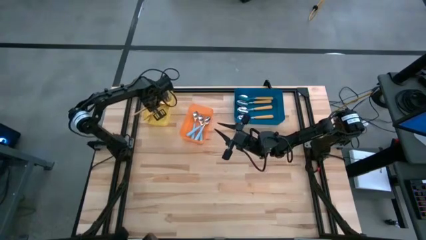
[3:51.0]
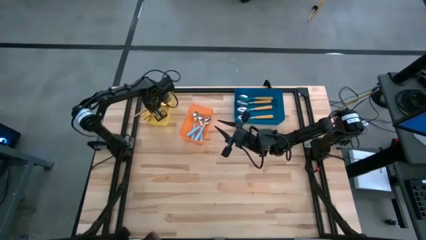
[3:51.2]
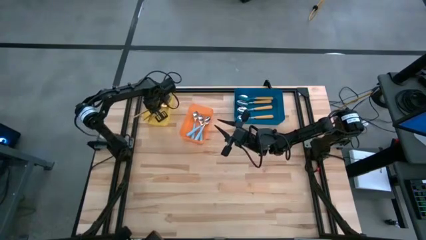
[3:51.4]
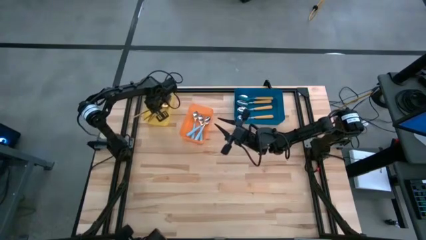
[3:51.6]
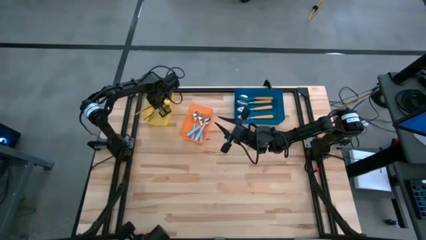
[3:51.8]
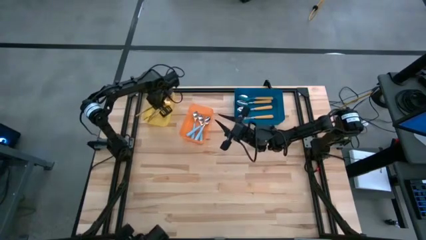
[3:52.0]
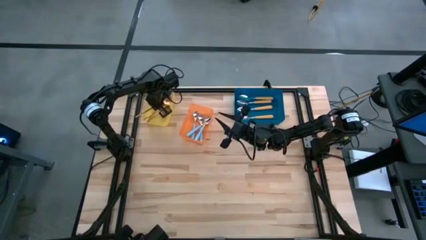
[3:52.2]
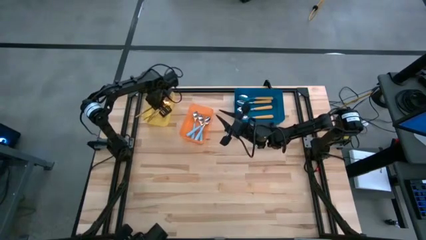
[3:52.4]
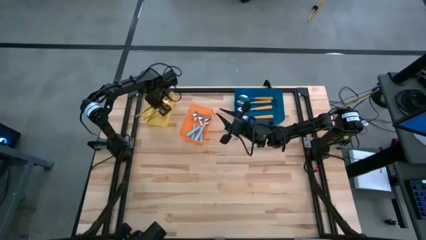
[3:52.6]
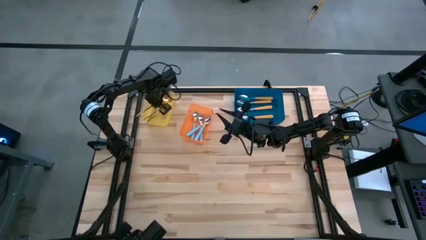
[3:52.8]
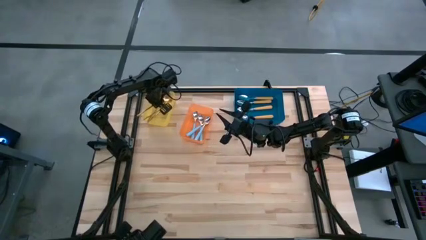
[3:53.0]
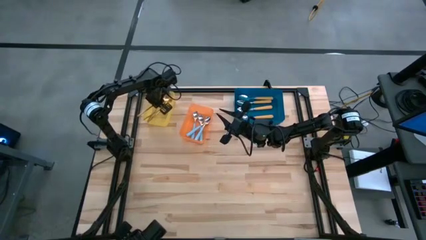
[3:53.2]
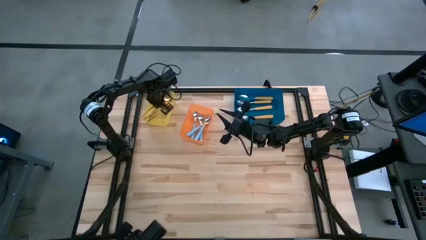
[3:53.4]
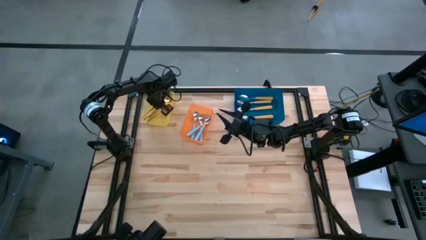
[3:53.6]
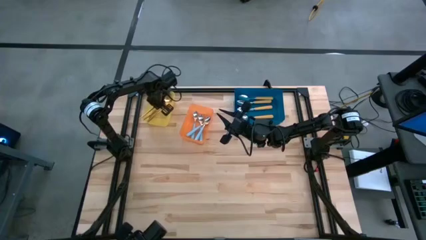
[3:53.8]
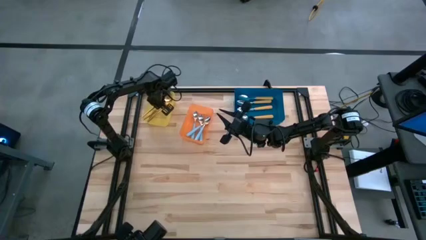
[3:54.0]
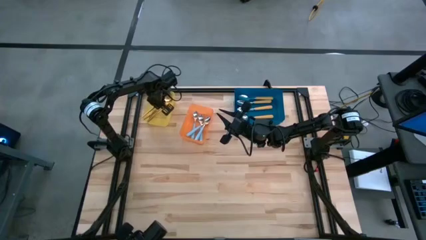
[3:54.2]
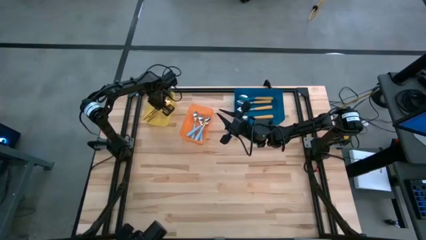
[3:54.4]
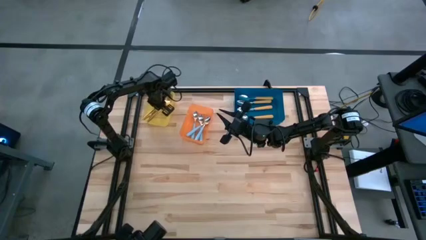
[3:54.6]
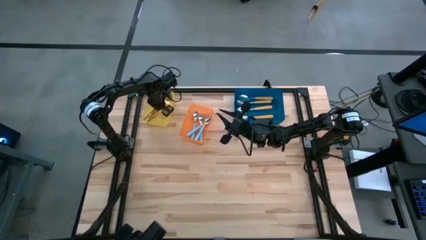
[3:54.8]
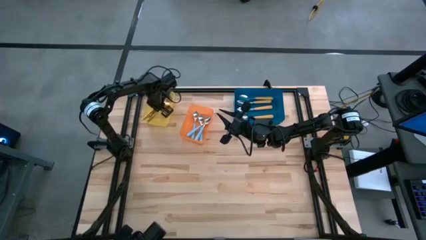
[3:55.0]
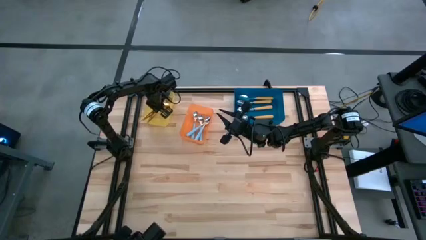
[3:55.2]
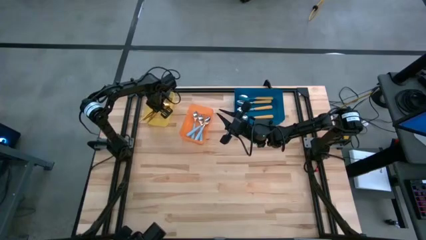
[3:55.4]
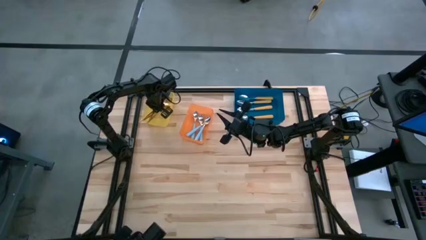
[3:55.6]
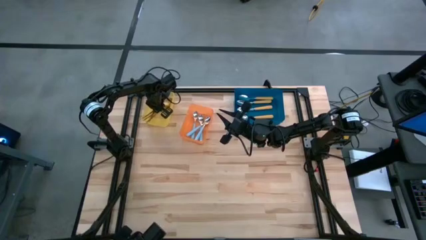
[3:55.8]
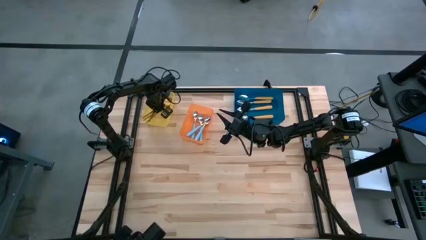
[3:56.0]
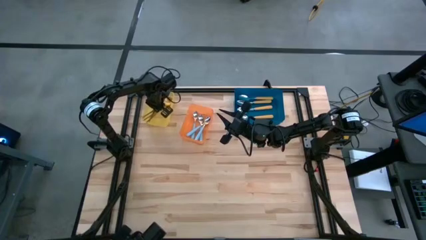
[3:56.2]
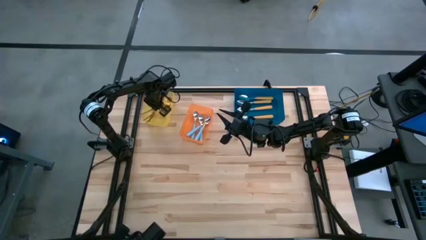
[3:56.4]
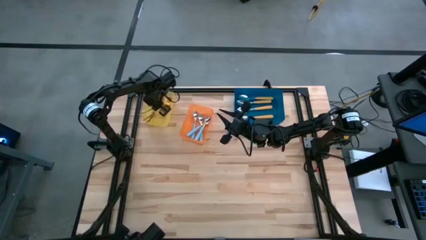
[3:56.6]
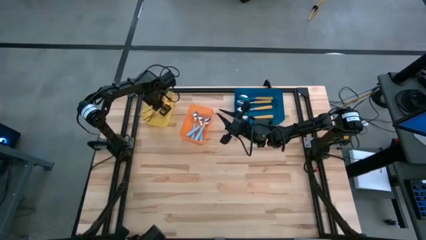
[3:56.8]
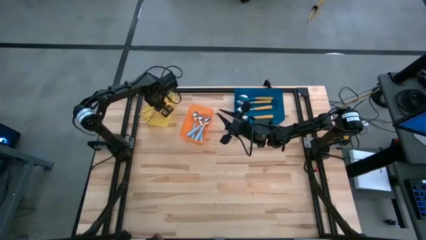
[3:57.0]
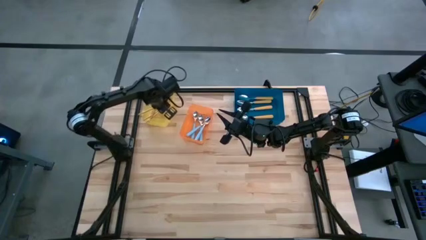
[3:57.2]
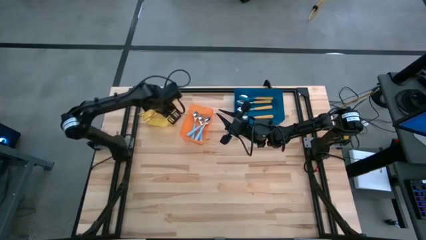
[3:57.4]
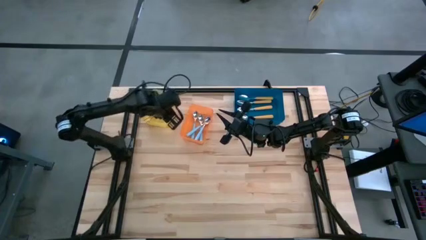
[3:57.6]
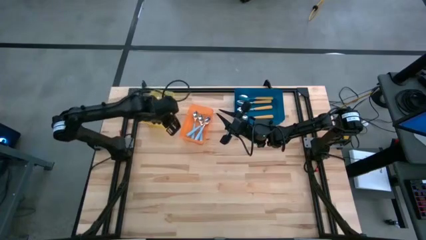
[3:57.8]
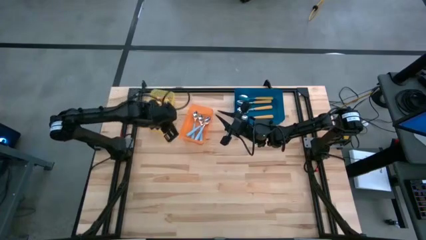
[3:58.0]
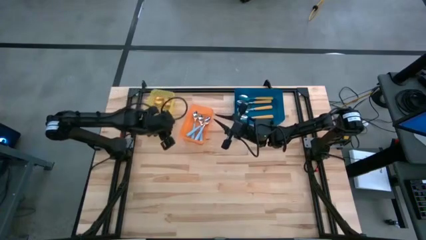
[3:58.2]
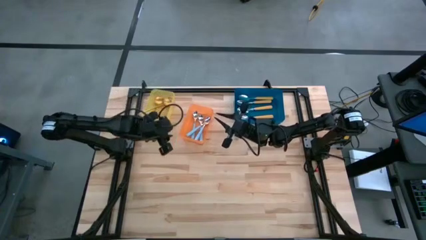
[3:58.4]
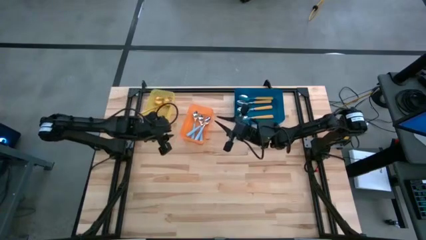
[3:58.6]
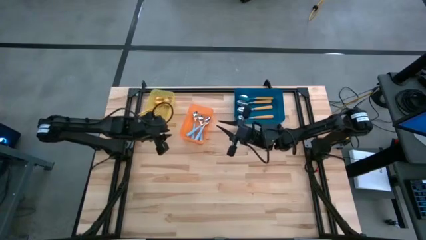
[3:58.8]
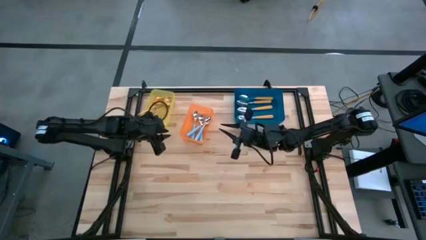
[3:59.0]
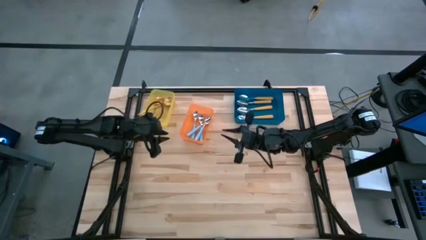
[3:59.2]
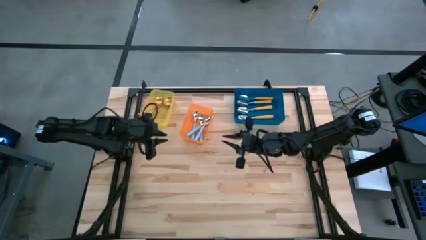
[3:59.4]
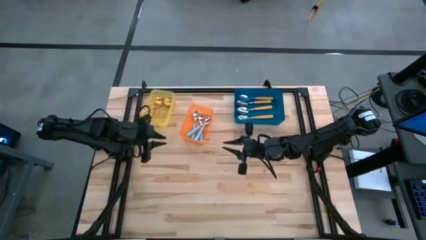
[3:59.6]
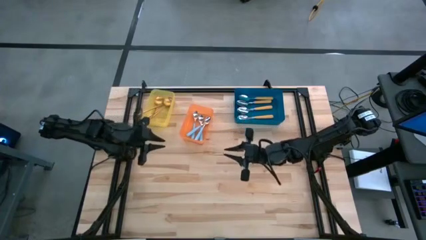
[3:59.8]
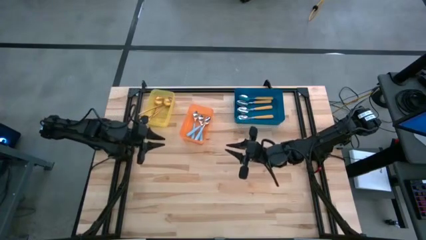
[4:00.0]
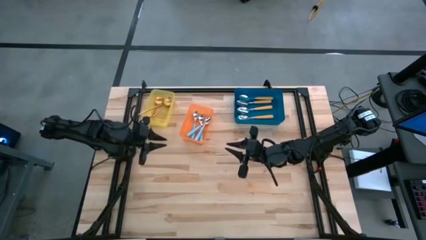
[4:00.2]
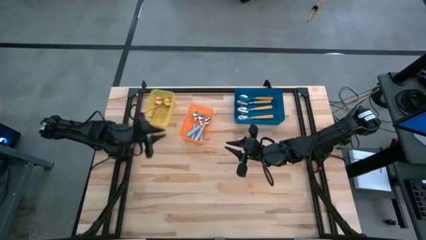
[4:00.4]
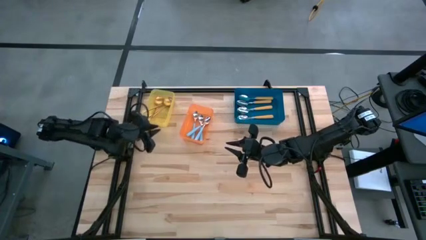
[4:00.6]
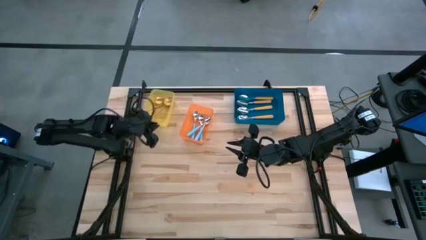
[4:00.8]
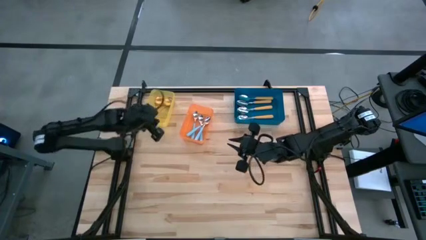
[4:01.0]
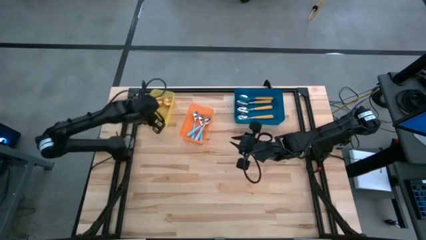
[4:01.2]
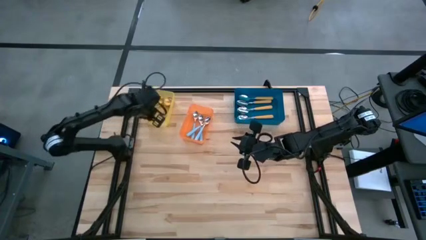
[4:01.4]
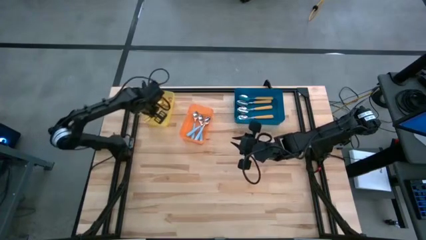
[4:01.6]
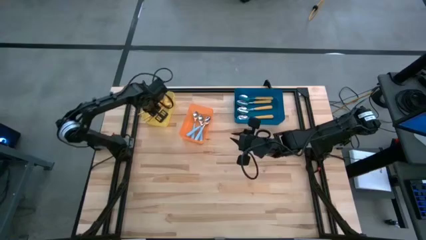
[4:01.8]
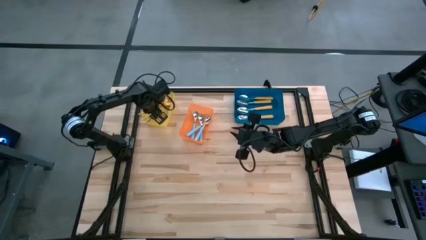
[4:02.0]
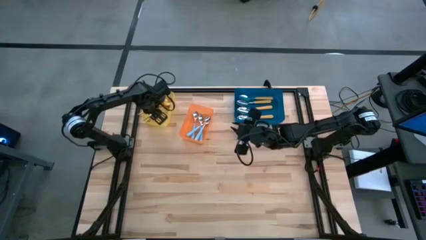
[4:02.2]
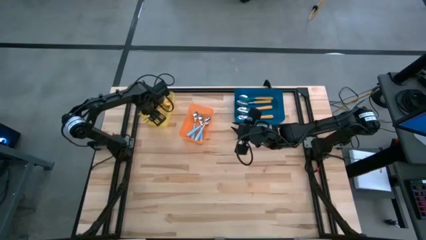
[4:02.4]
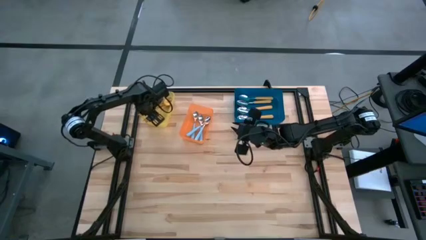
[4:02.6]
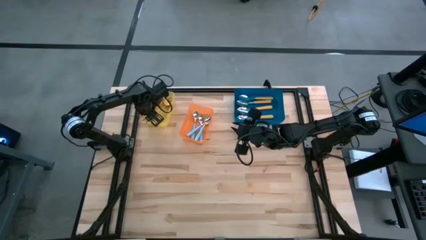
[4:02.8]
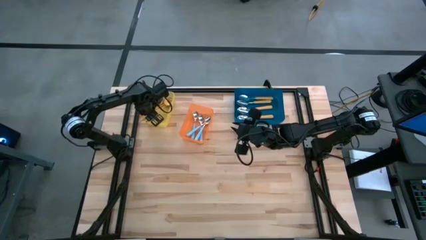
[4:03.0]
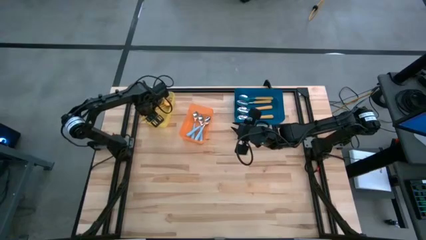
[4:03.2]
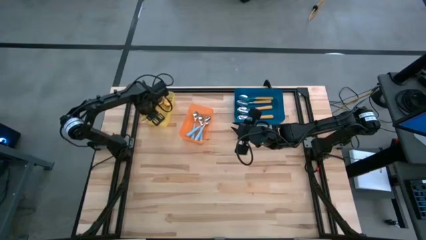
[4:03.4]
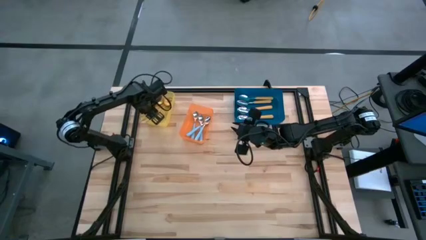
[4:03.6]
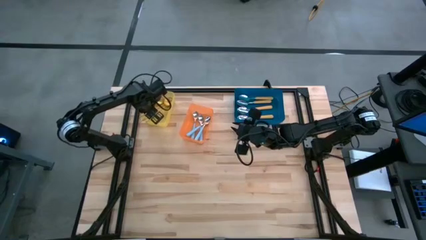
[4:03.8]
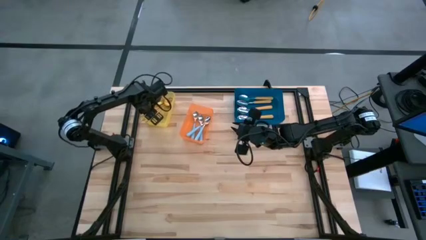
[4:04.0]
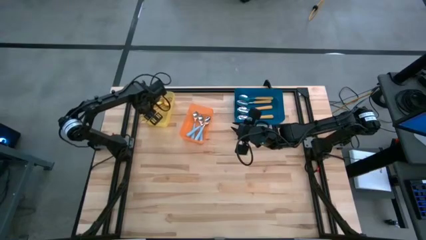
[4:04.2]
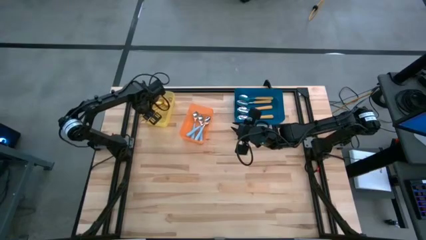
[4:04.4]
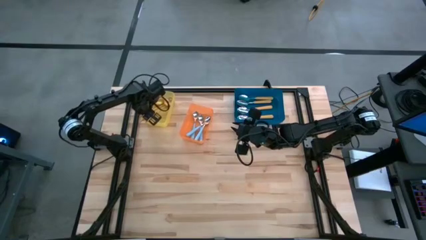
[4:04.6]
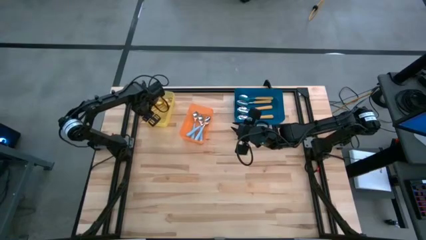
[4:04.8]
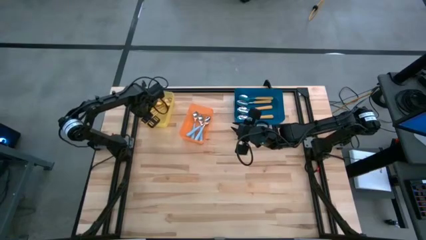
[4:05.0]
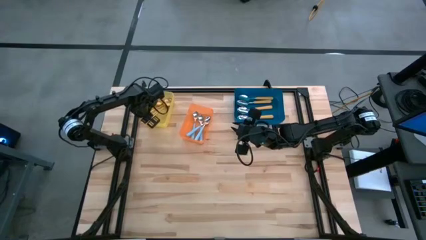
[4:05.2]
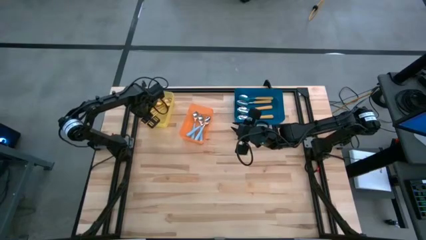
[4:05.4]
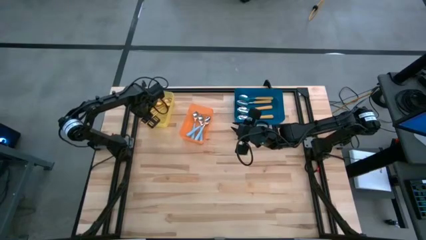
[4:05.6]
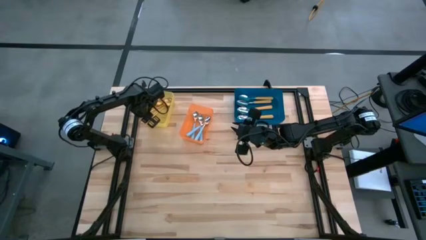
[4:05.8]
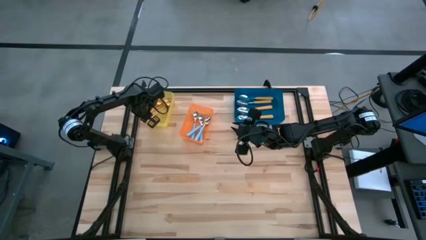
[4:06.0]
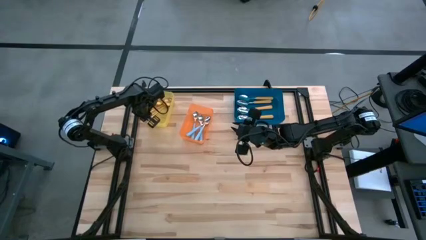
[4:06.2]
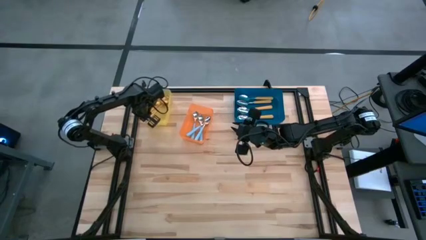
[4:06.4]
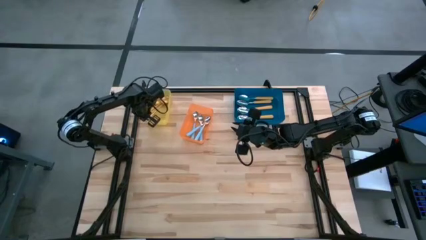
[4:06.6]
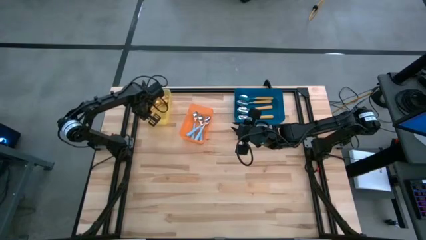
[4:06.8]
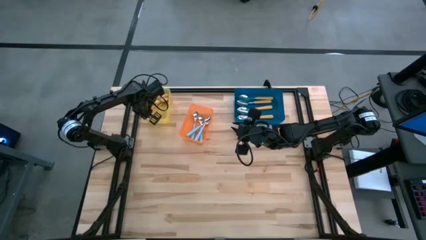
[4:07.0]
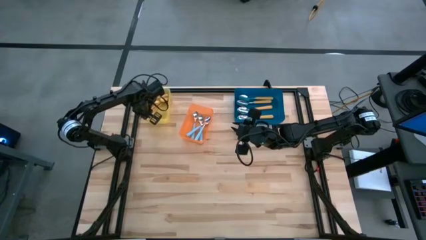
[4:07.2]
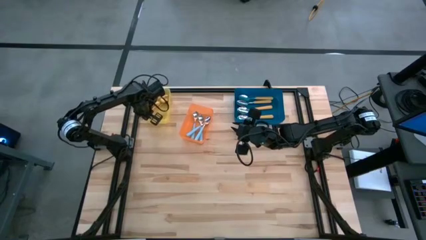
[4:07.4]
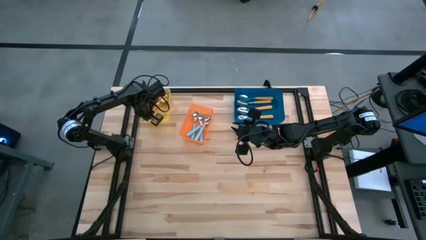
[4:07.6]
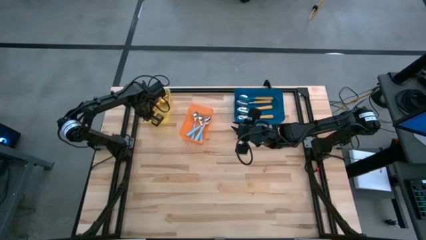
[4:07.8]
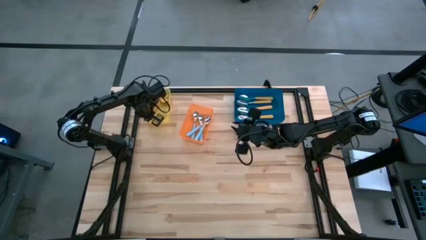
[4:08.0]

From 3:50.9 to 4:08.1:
Task: Sort silverware by color (type)
Put the gold spoon into the yellow bin
